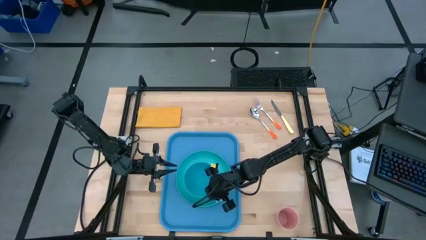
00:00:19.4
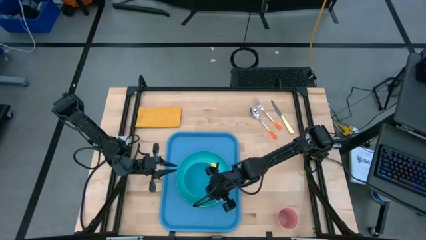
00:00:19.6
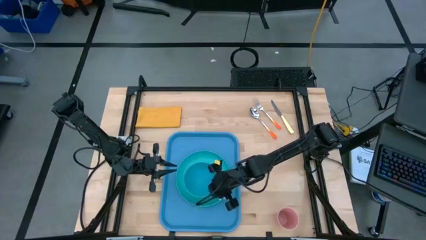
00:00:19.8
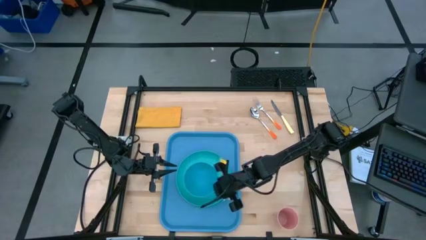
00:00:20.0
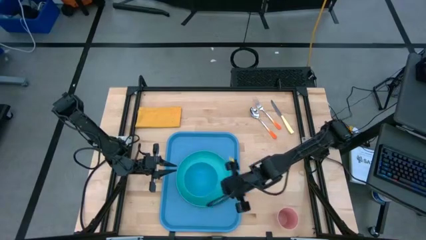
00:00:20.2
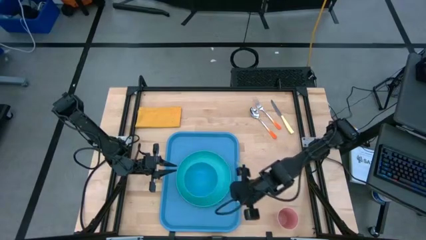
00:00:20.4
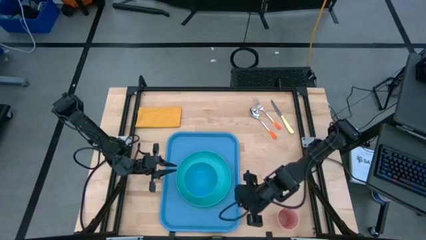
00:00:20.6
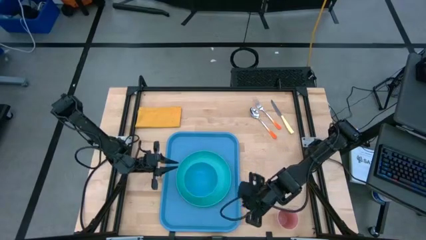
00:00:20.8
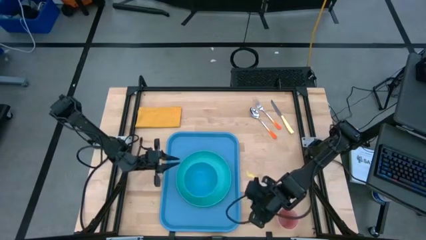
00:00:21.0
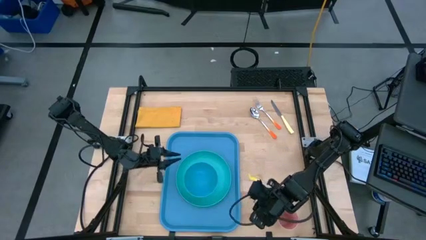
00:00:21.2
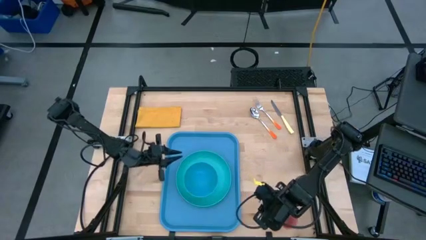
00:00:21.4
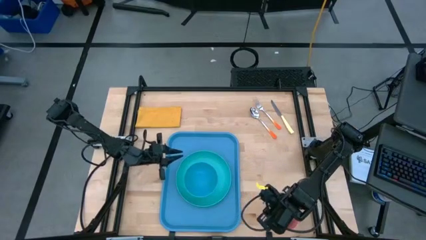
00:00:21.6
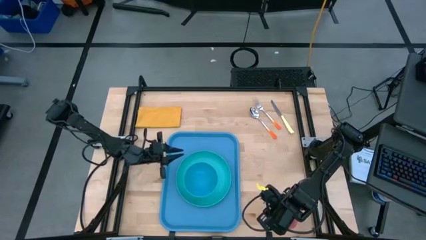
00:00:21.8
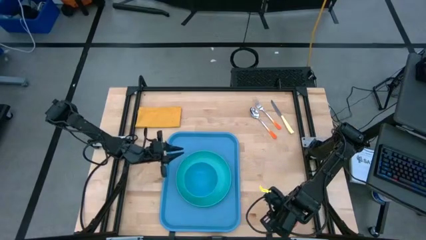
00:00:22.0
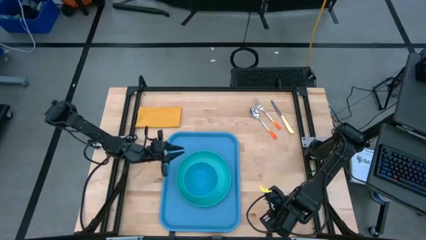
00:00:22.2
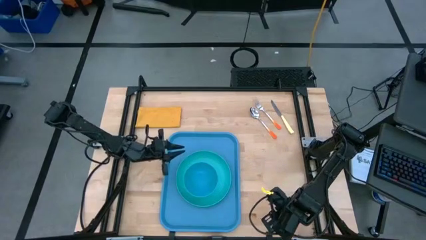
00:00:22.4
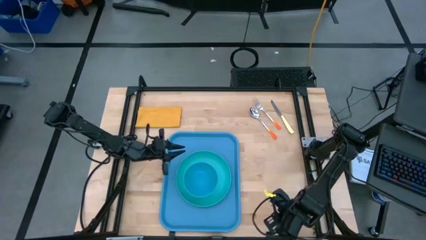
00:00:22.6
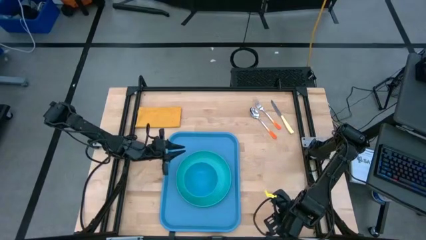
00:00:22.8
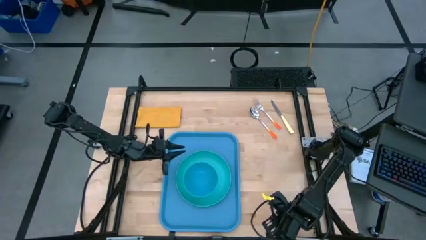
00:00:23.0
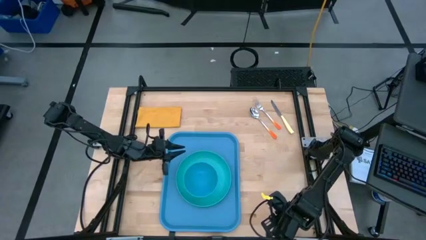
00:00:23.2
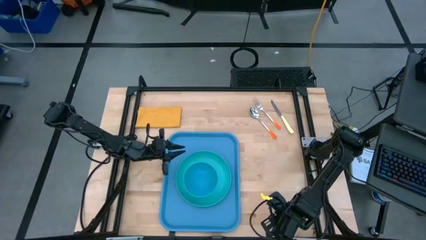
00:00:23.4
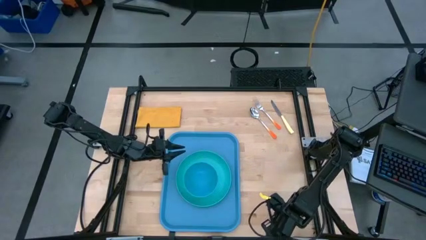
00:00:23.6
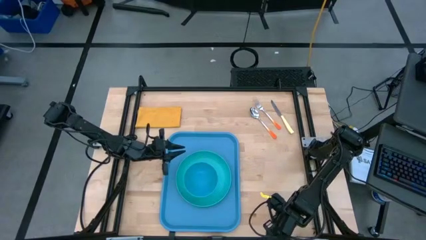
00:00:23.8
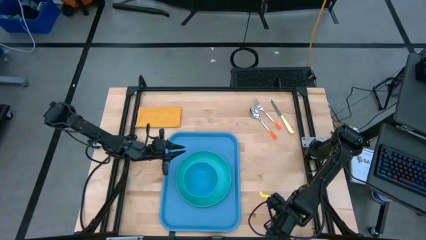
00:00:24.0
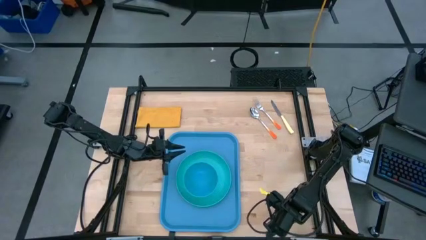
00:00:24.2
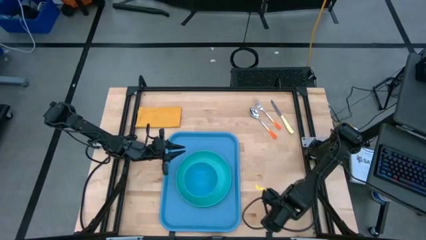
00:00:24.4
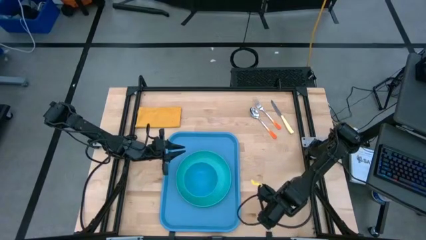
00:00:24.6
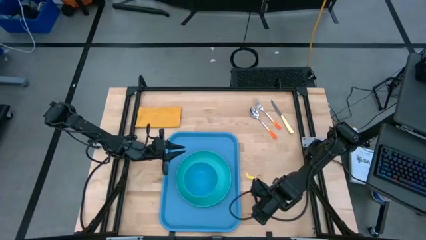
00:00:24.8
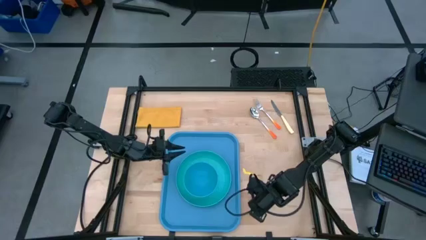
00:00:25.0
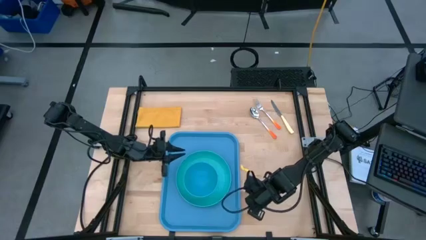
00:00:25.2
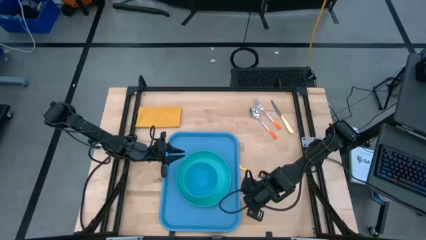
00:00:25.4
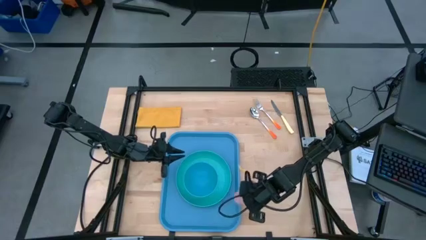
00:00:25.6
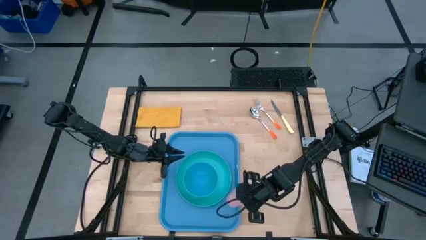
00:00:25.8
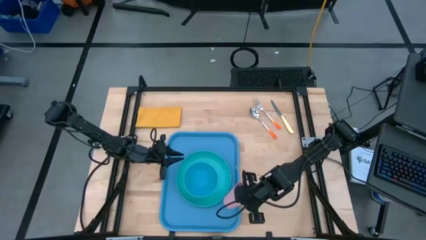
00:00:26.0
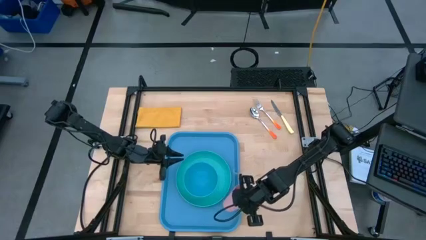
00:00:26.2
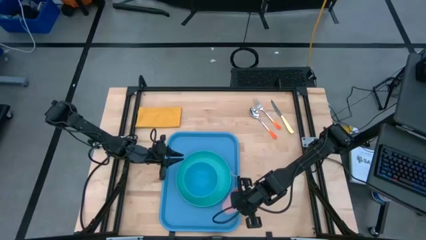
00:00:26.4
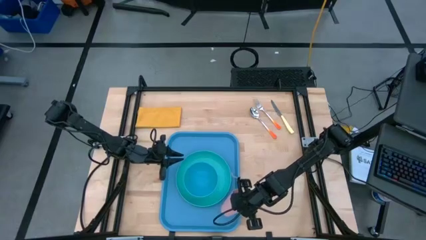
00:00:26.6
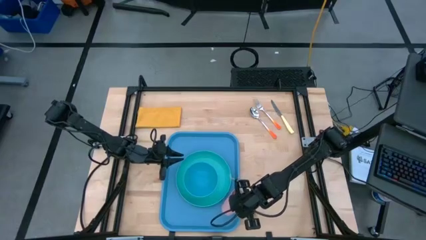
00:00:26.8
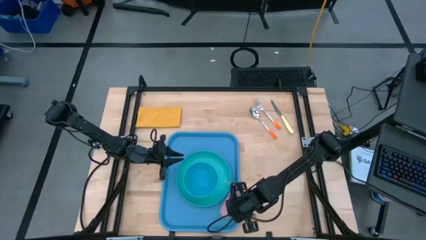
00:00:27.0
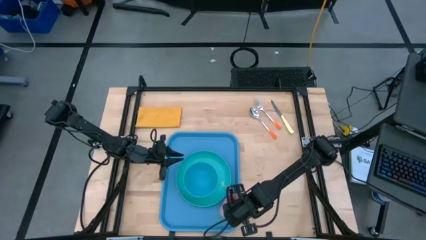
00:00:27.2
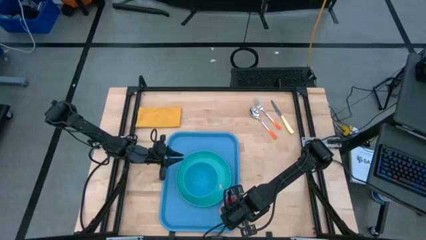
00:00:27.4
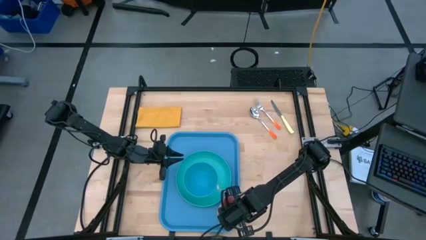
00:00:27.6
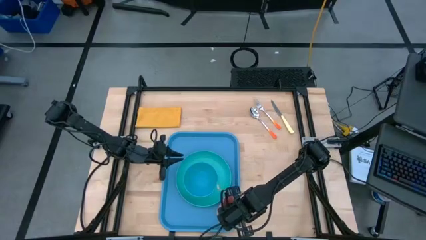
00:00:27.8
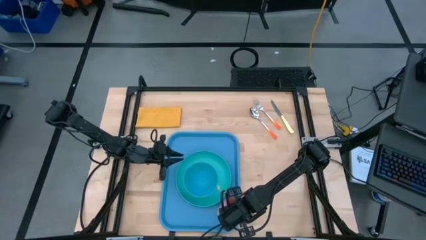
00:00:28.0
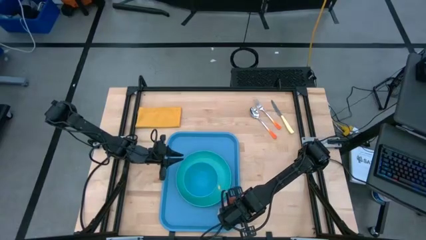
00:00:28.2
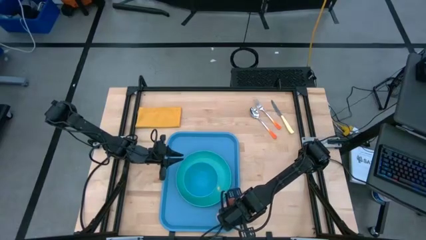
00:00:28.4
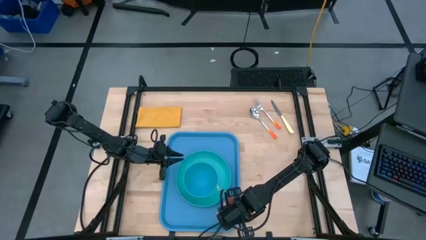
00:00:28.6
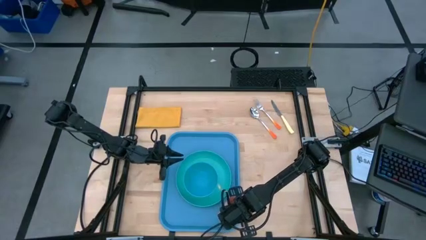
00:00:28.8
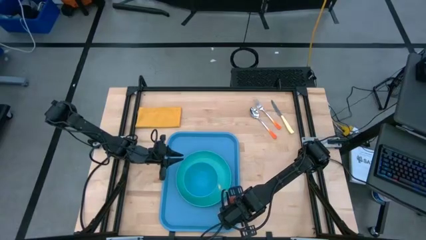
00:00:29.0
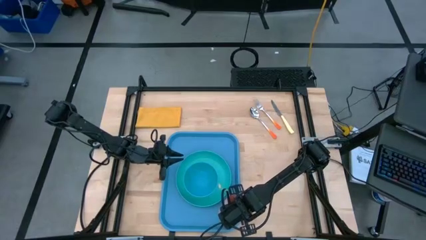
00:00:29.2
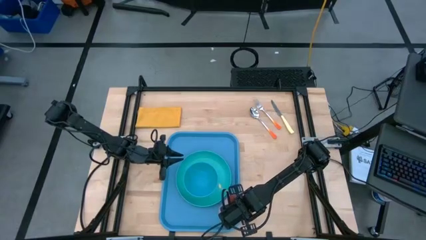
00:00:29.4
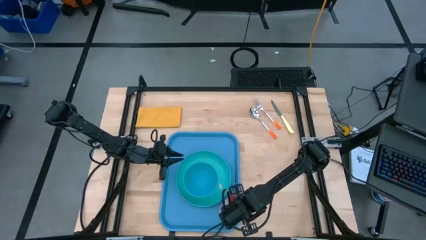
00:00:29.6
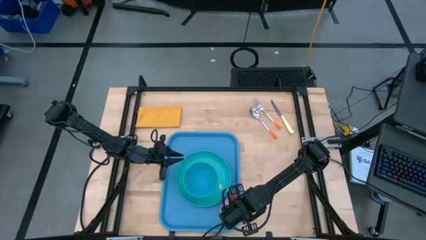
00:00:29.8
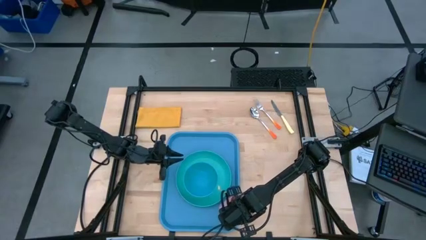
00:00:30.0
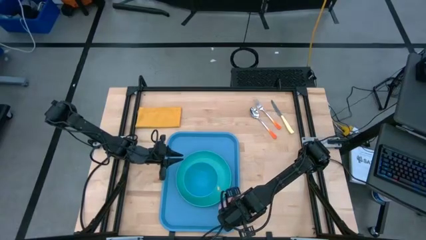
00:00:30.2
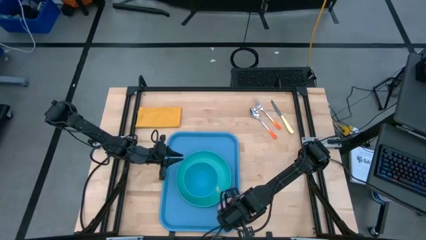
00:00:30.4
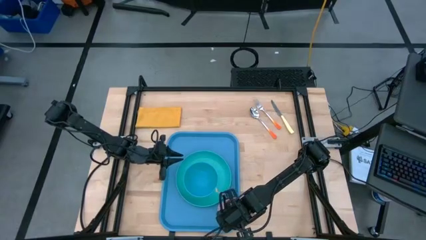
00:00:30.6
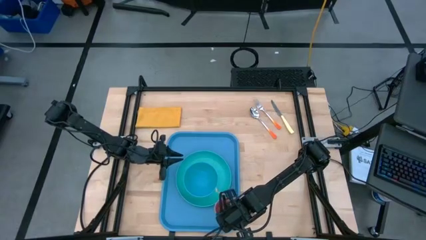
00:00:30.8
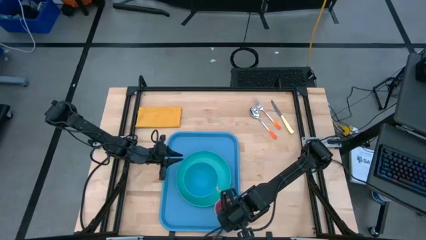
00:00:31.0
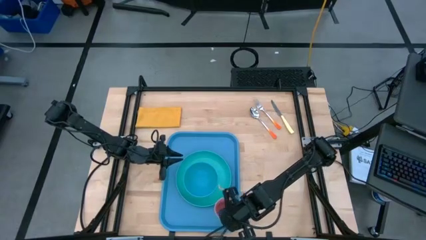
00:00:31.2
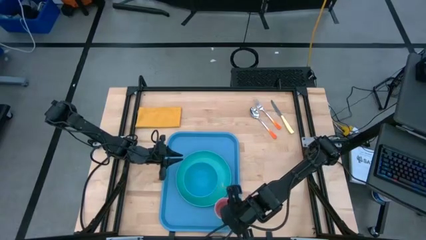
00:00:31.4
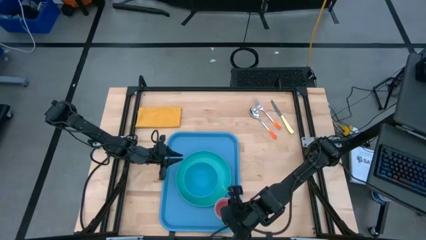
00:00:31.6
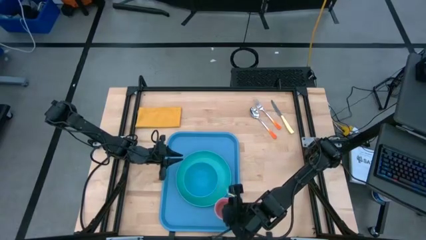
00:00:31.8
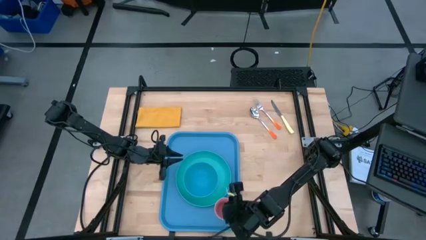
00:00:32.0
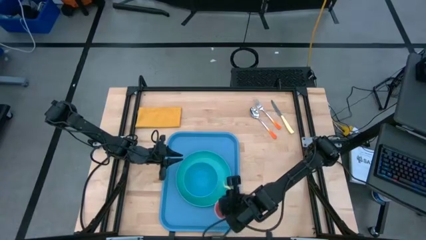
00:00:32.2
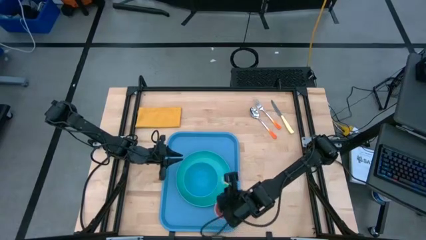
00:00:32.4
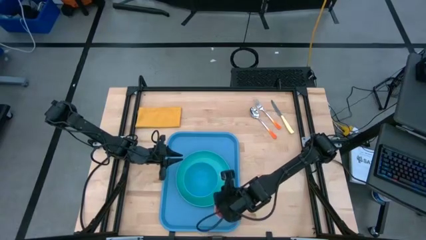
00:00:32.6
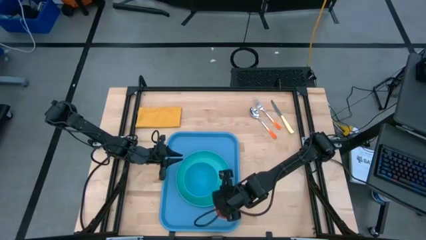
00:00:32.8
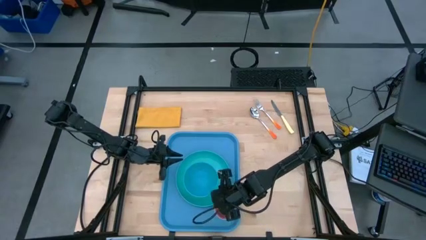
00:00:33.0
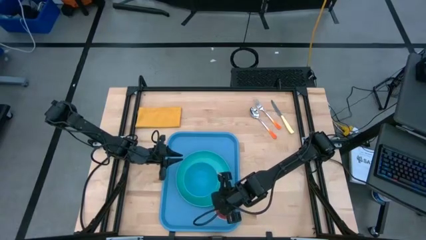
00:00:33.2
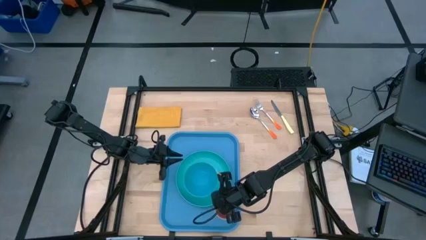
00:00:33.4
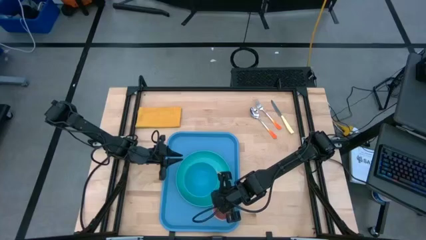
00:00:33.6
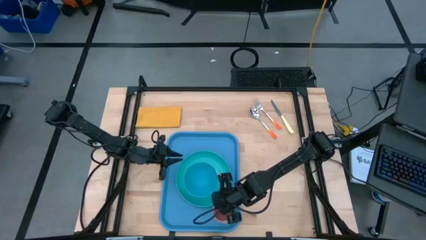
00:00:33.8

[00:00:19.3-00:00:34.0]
Task: Set up tray
Put the pink cup on the blue tray to the bottom right of the light blue plate

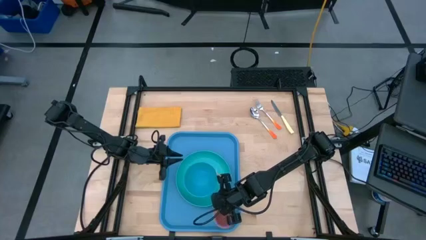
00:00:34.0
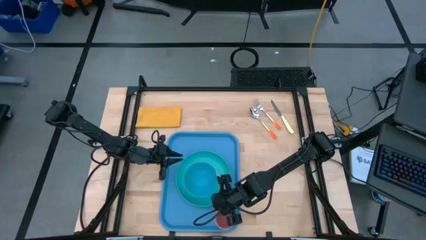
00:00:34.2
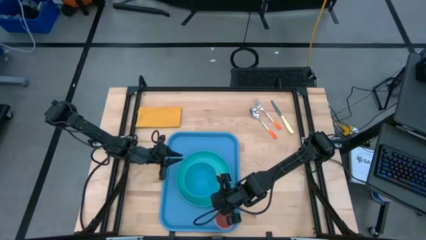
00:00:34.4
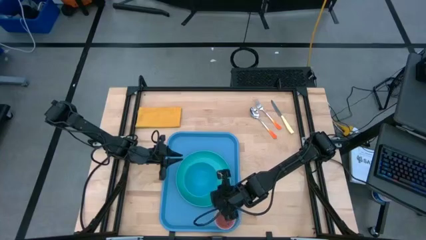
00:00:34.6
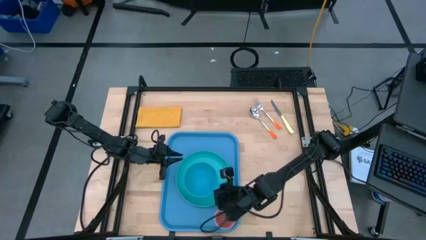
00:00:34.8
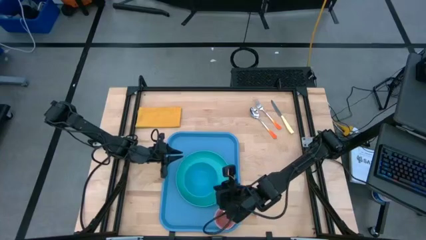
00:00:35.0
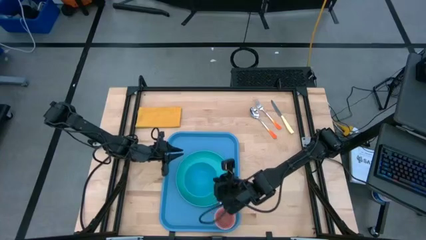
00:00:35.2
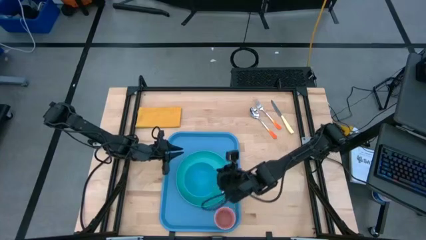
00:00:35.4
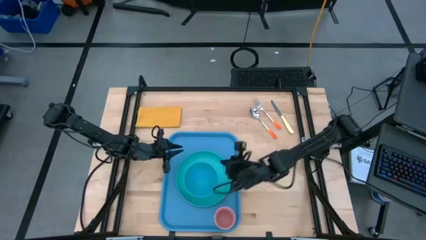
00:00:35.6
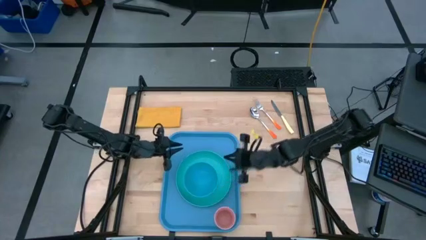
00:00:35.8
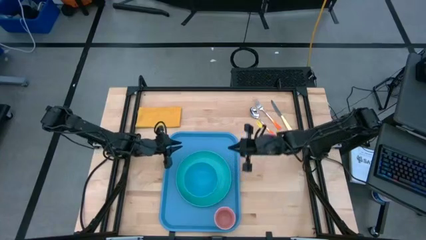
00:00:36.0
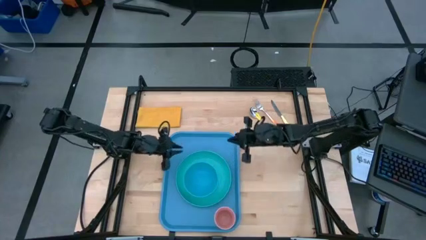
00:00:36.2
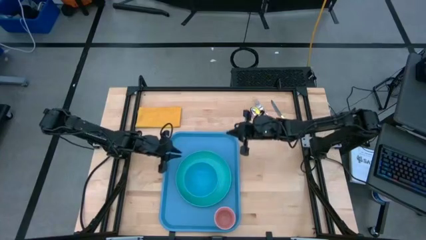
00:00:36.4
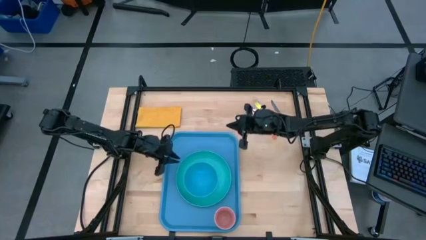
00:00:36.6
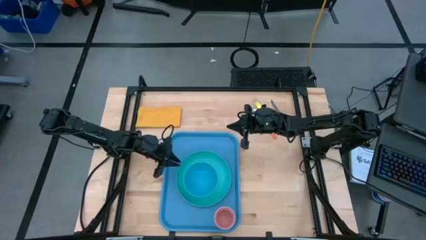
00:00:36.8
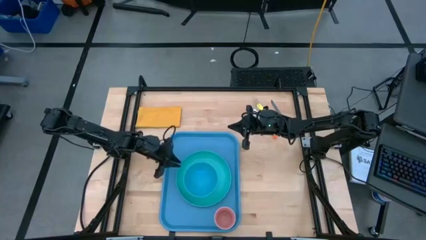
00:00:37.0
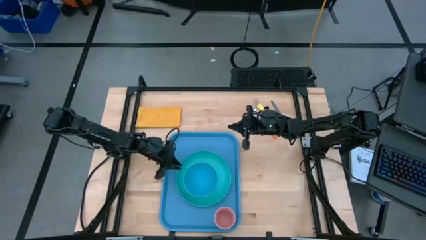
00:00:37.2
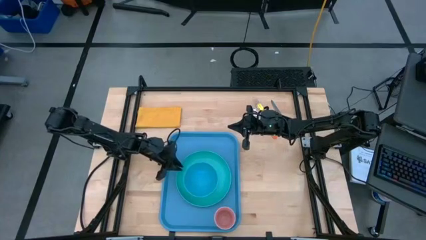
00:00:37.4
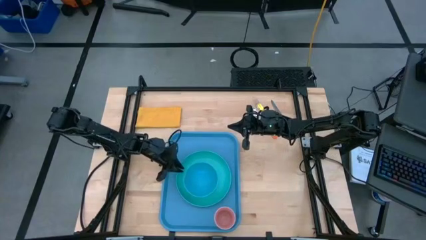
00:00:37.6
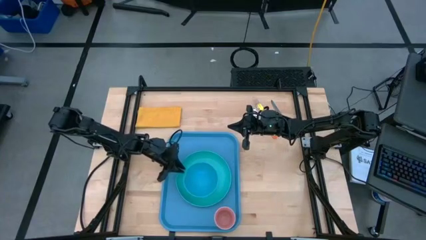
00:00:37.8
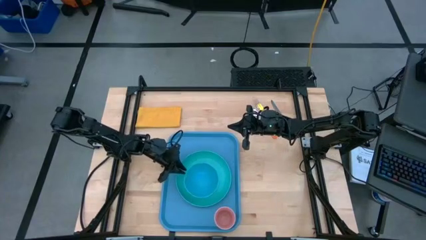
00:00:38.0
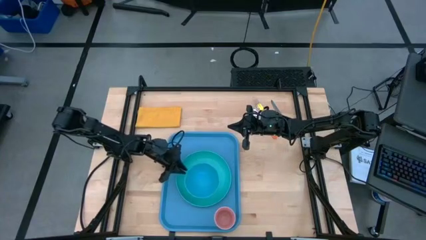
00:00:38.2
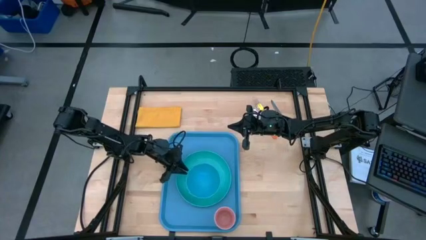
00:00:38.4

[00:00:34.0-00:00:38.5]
Adjust the blue bowl on the light blue plate
